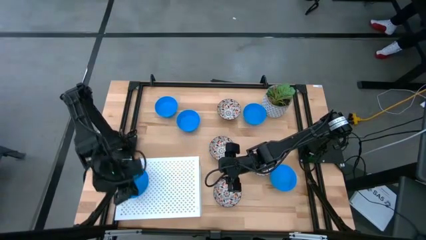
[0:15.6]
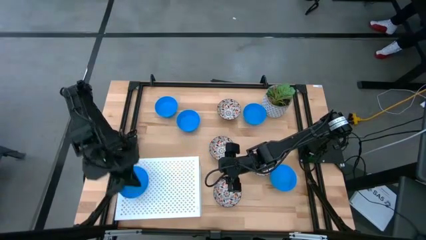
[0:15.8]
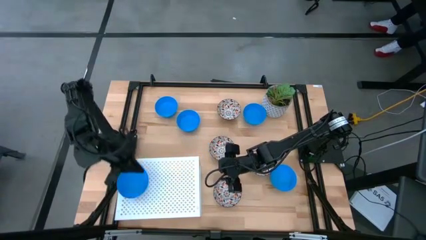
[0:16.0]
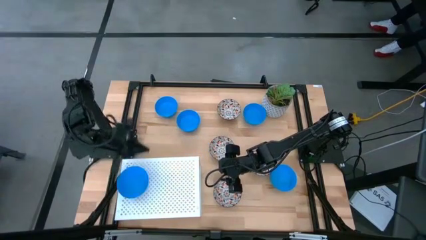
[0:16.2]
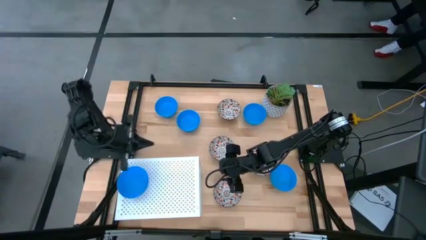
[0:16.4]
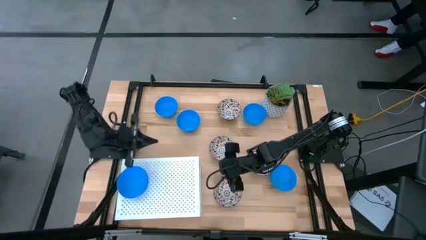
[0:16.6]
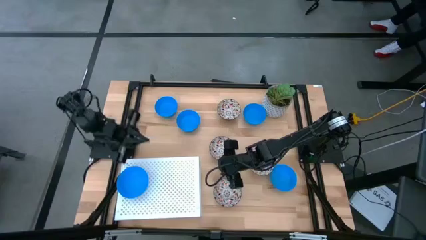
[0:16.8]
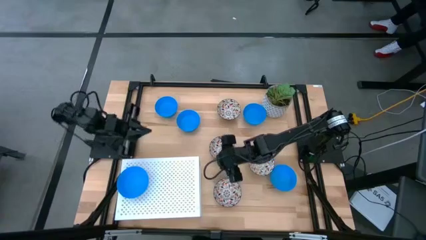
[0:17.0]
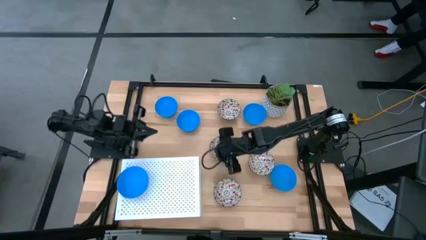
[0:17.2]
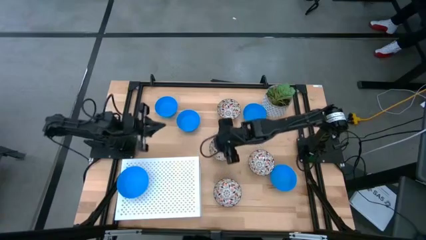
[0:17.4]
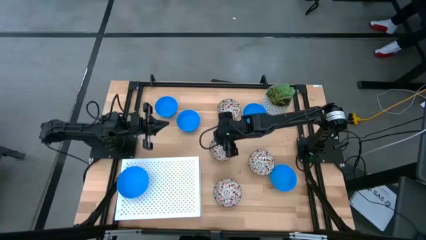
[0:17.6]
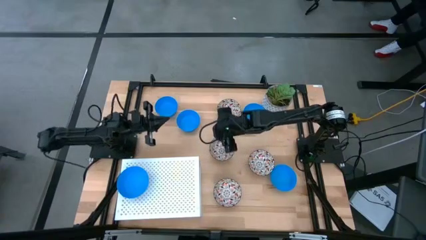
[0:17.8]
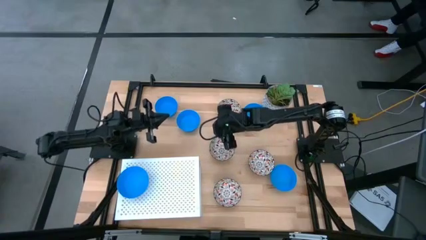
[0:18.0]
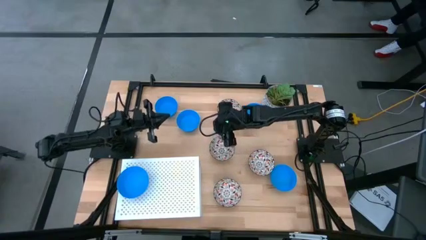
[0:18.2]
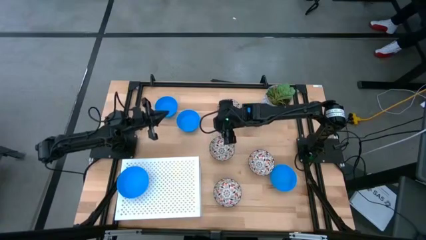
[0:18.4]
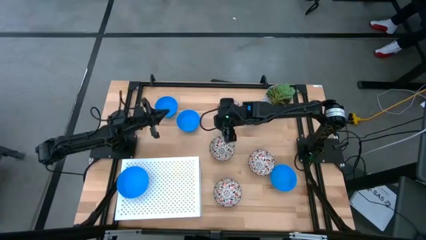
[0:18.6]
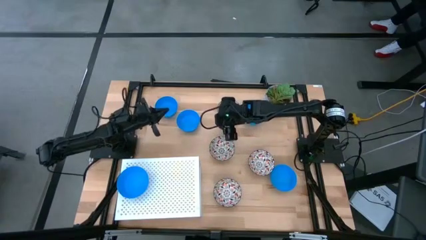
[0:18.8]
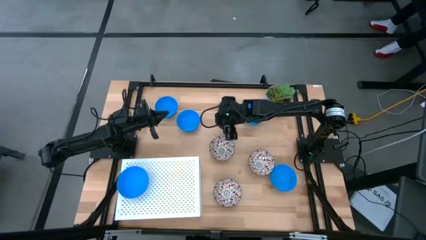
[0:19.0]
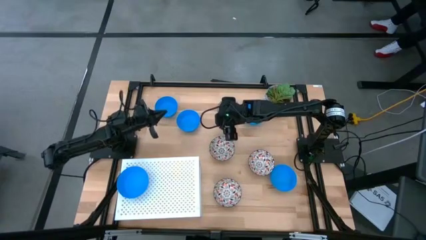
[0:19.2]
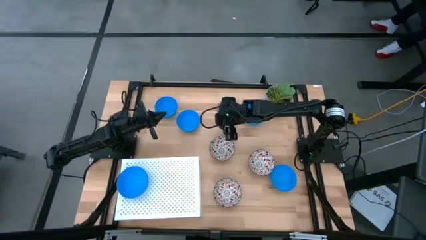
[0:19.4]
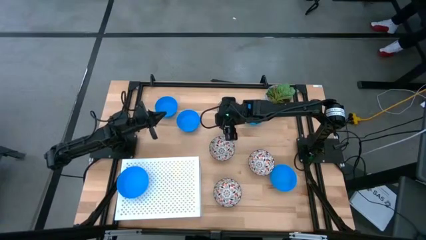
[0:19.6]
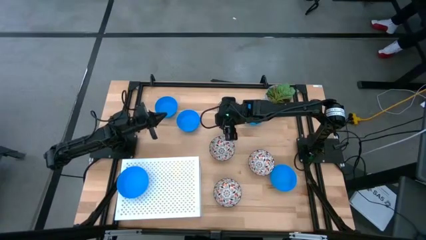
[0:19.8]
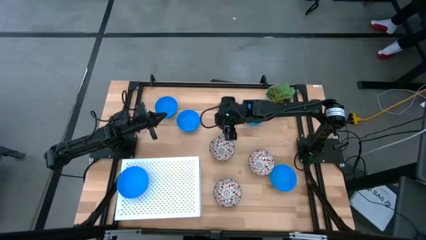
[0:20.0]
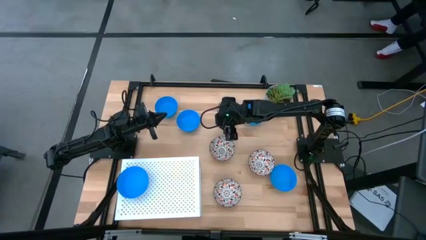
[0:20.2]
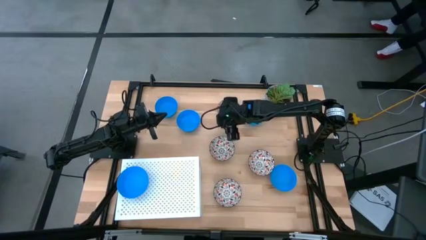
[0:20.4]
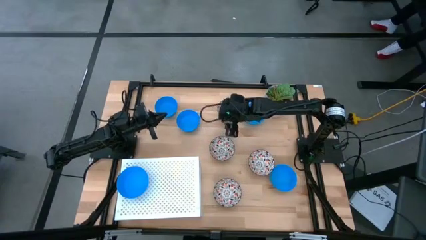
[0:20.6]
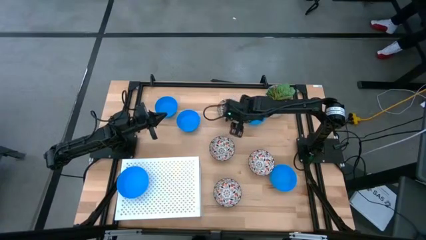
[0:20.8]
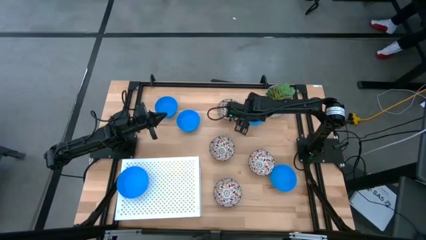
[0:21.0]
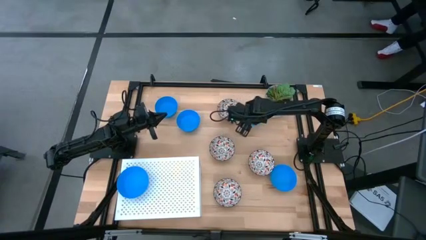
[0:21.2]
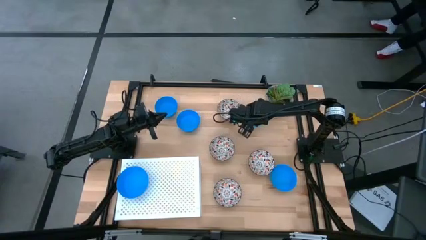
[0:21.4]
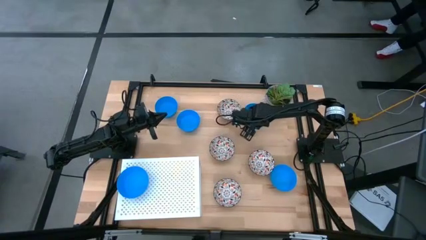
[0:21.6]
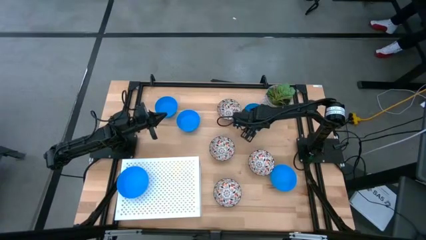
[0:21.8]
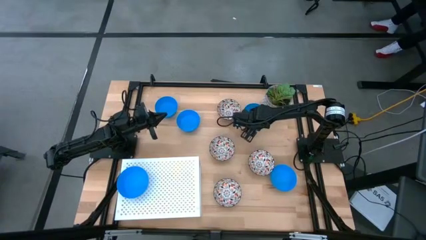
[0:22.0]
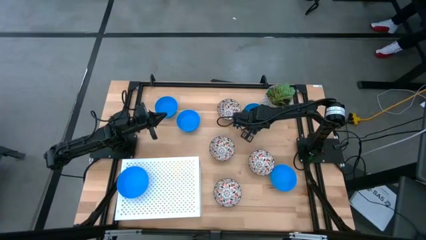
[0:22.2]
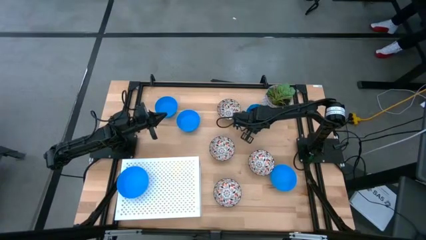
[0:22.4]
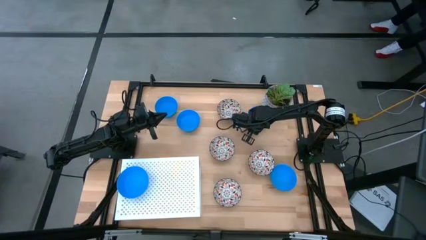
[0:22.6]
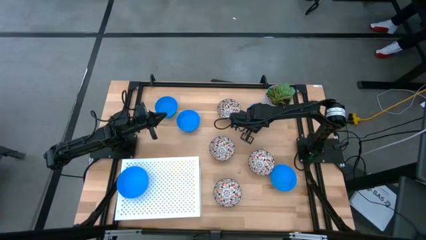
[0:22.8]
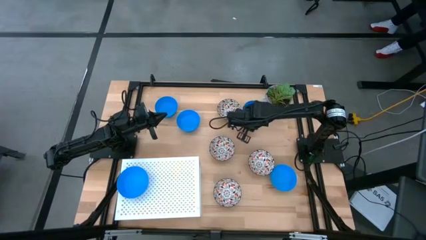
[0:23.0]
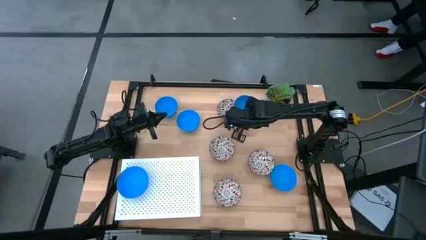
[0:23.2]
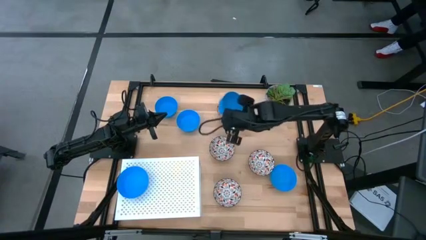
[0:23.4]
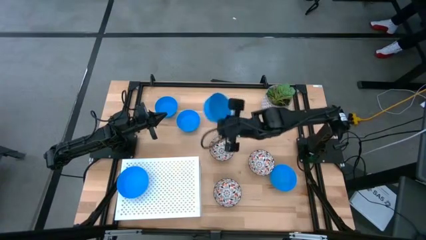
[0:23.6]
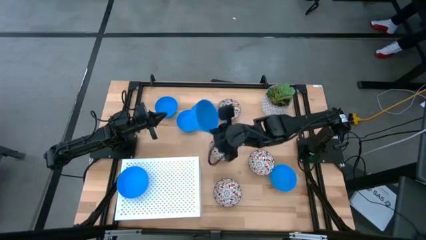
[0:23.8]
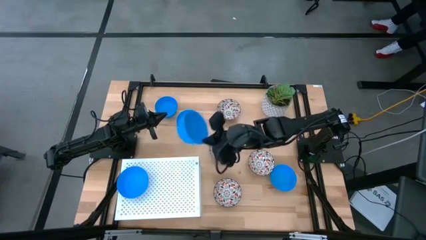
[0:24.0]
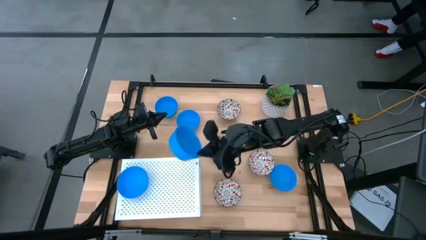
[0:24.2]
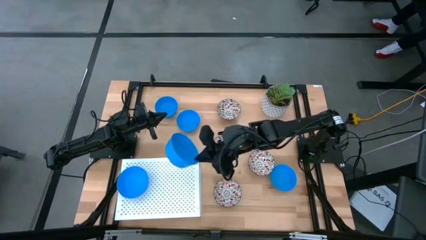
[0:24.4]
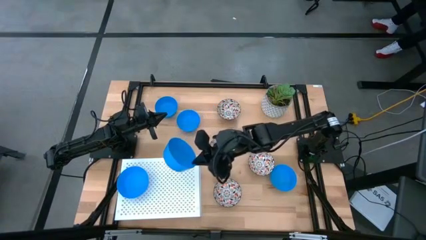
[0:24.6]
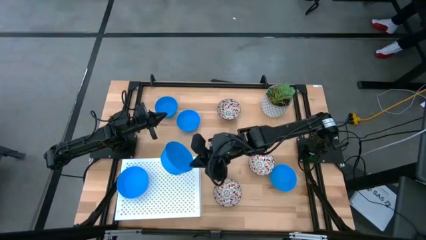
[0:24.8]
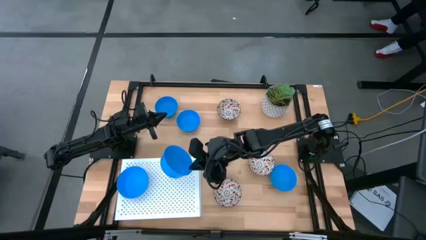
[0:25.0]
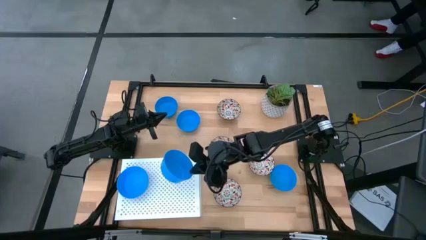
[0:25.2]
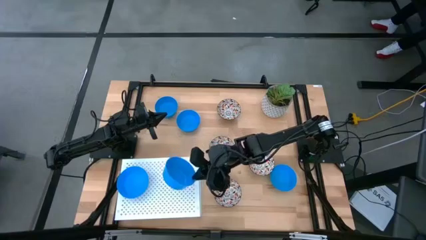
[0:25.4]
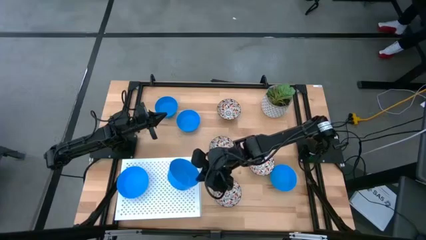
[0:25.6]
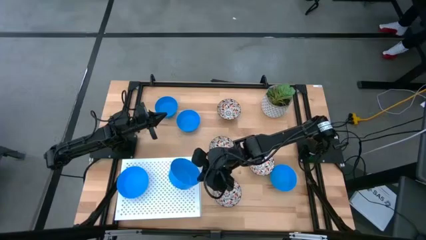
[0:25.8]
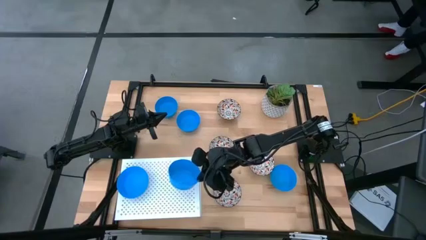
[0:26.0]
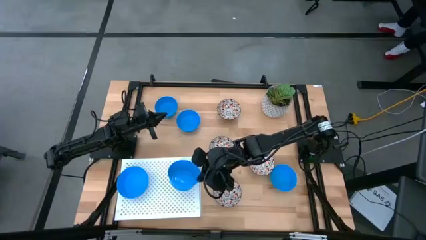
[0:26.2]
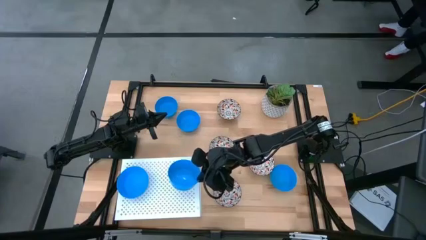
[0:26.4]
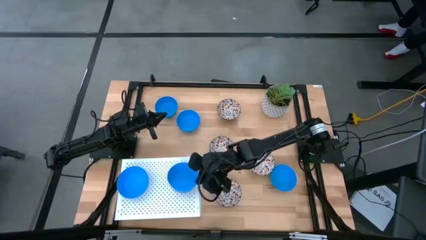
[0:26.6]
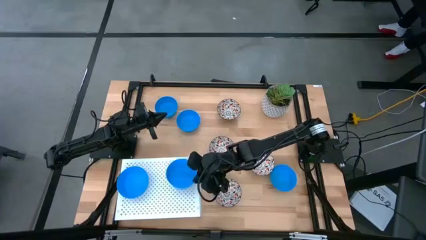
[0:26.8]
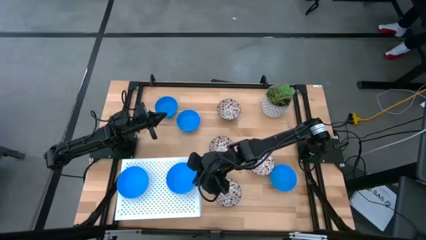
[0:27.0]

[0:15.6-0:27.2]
Task: Pick & Place Mini bowls
Put the blue bowl on the shelf
